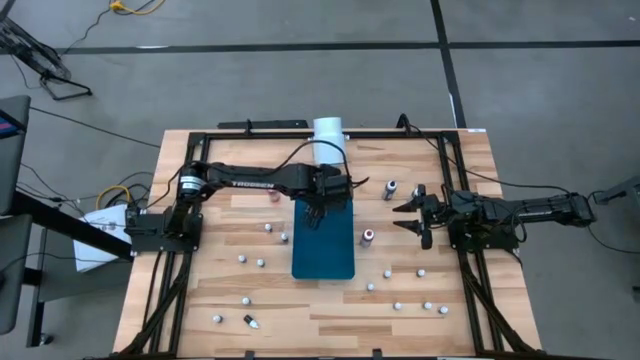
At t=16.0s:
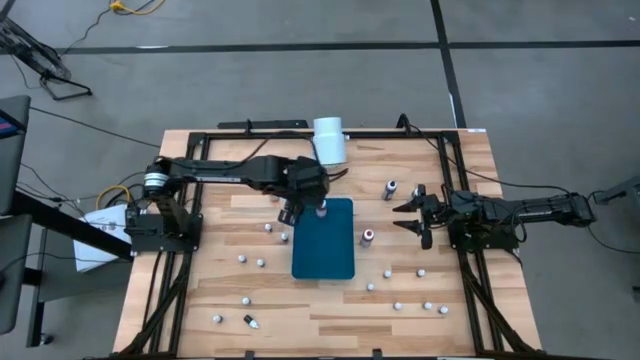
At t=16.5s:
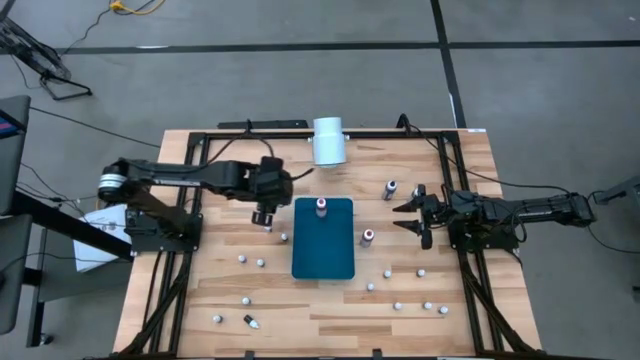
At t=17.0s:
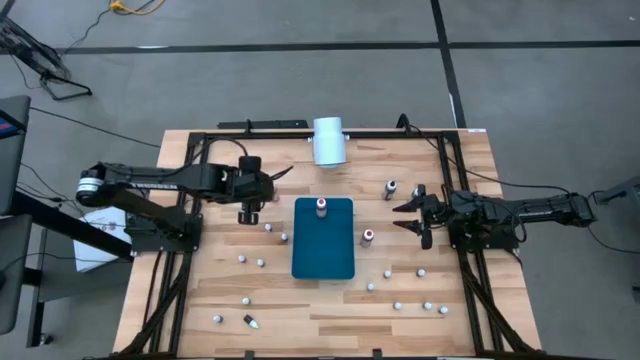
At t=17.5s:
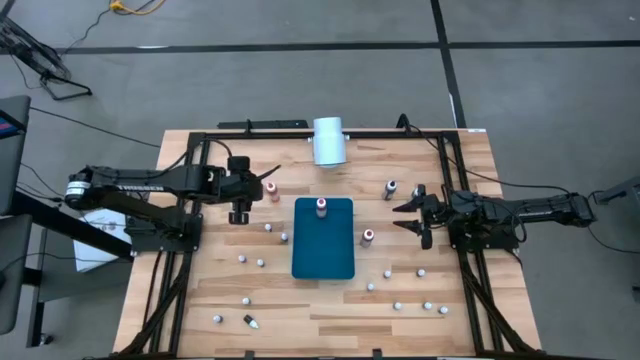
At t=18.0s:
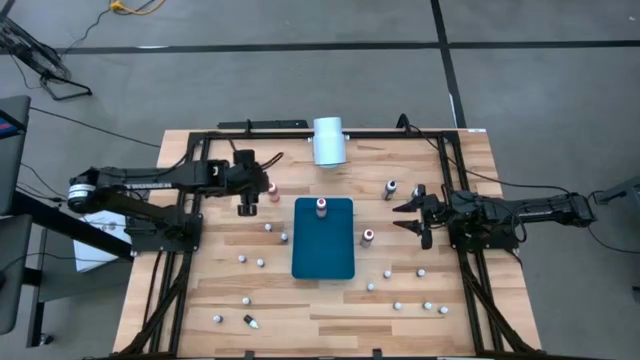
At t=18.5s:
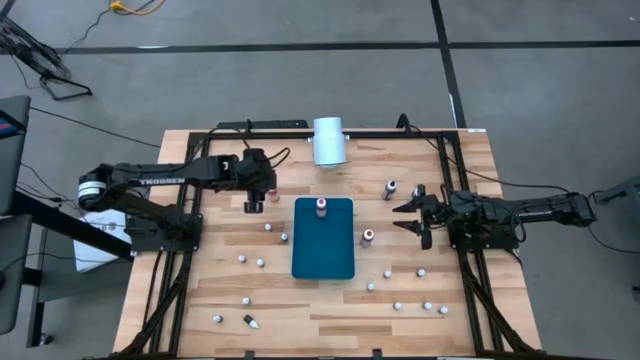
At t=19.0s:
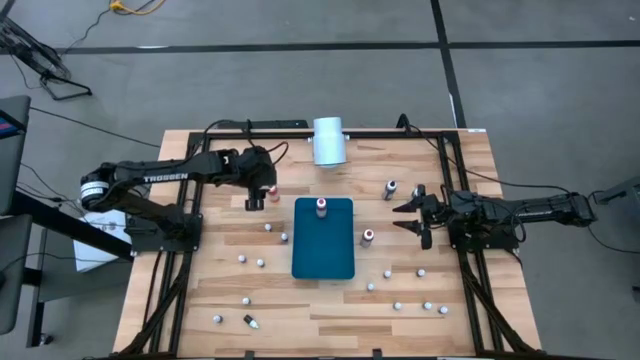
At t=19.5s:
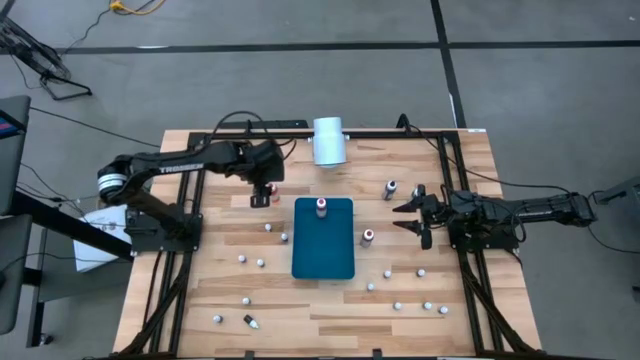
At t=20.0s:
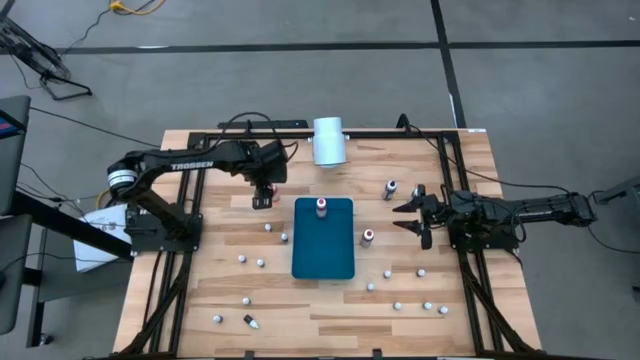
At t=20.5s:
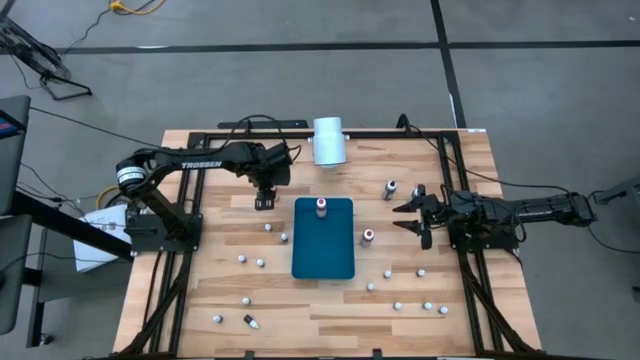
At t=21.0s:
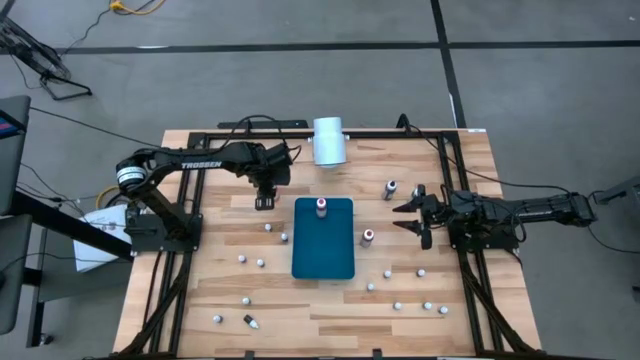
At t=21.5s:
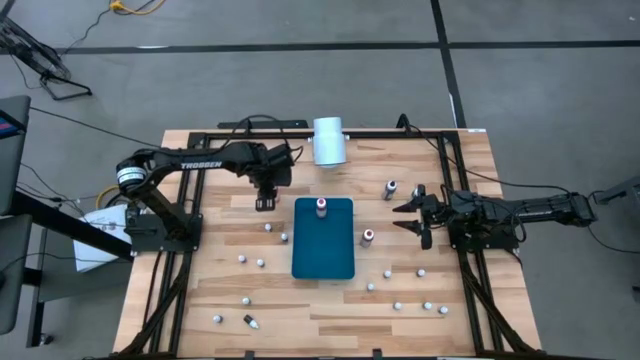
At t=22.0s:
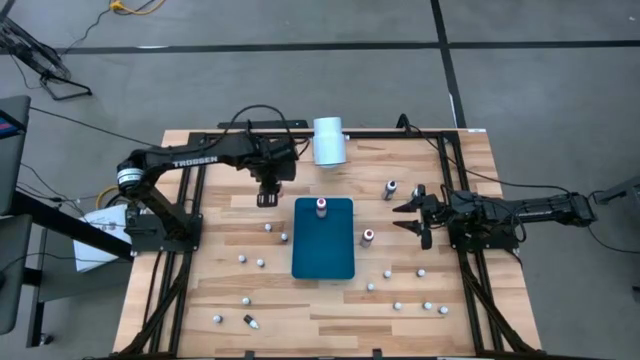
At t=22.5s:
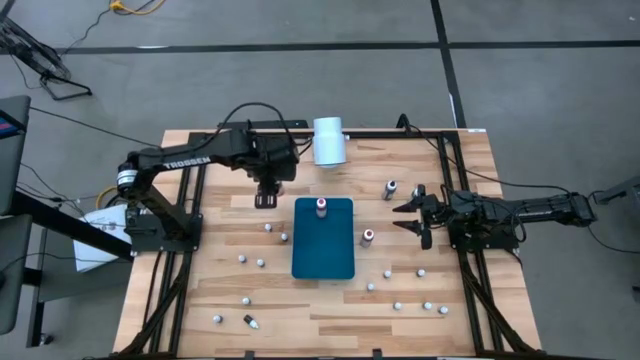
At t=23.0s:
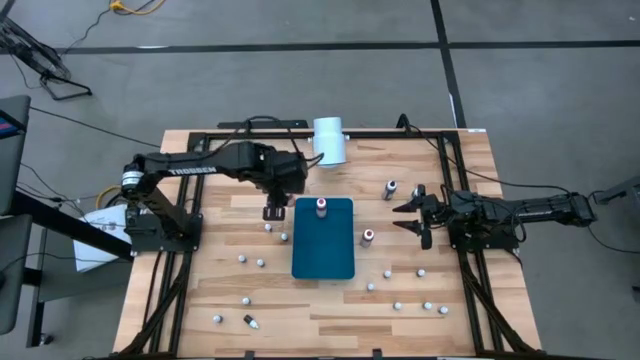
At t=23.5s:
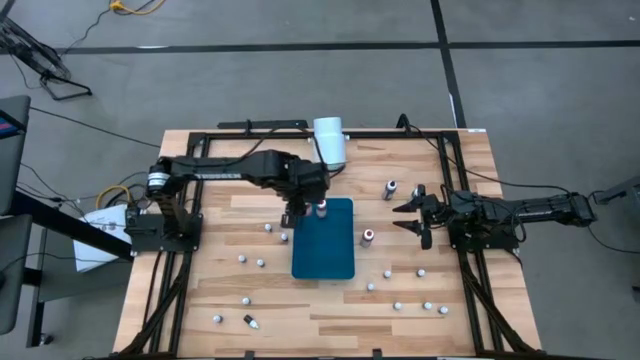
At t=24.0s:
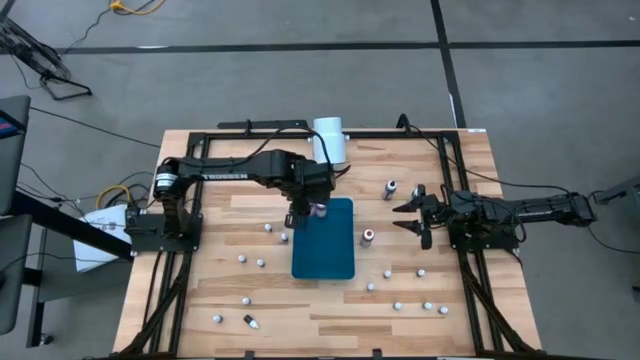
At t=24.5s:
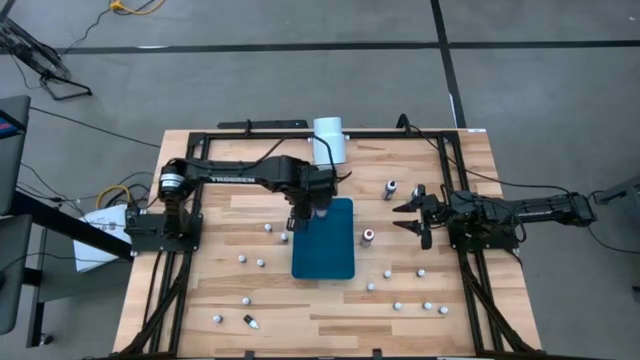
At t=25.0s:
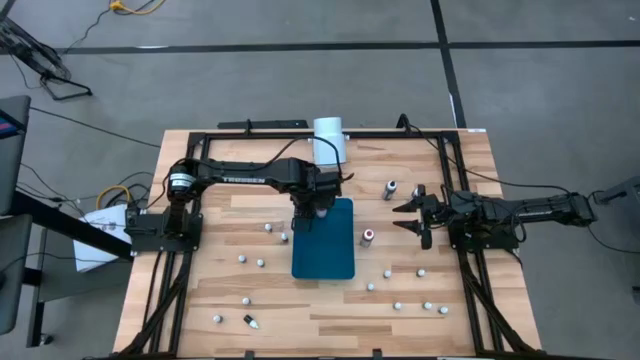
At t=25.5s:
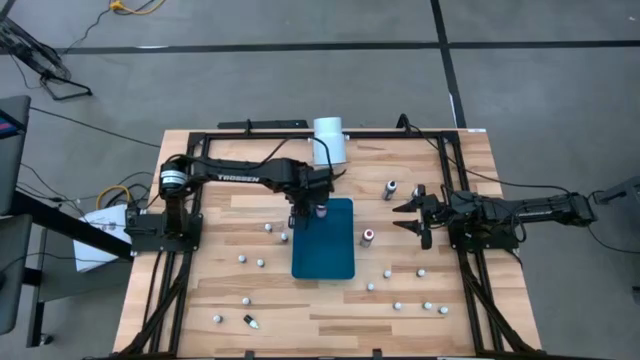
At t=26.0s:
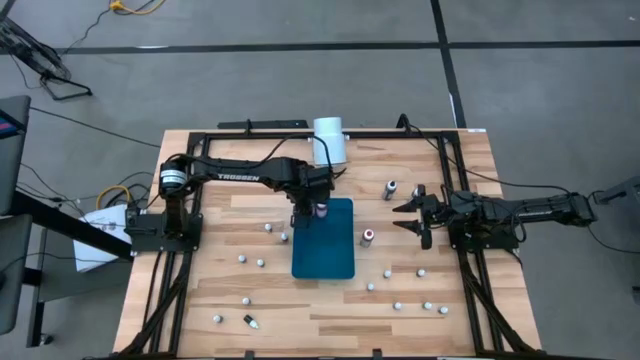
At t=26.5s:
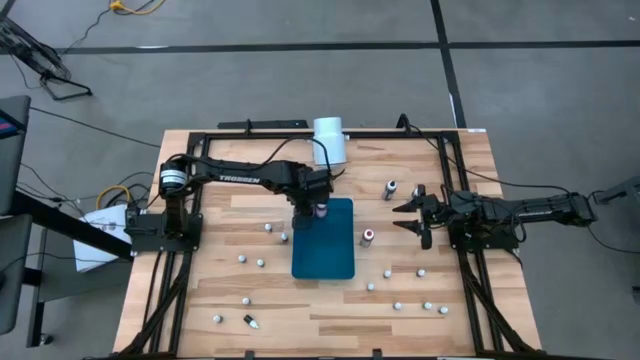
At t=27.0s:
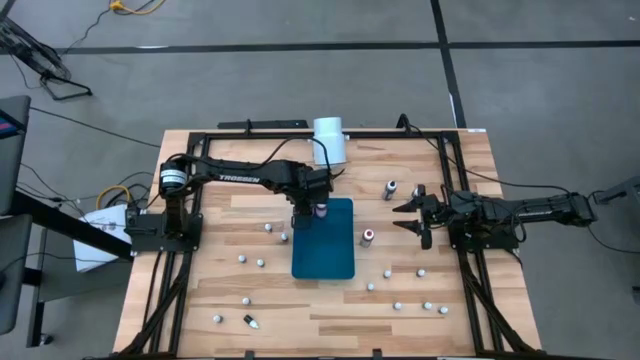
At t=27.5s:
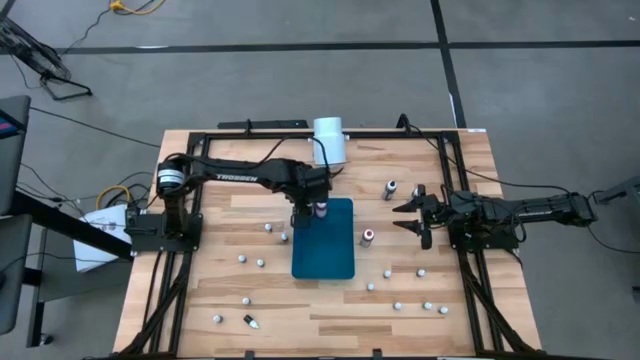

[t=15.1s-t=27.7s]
Task: Pick & Place food coloring
Put the large orange food coloring bottle into the blue bin

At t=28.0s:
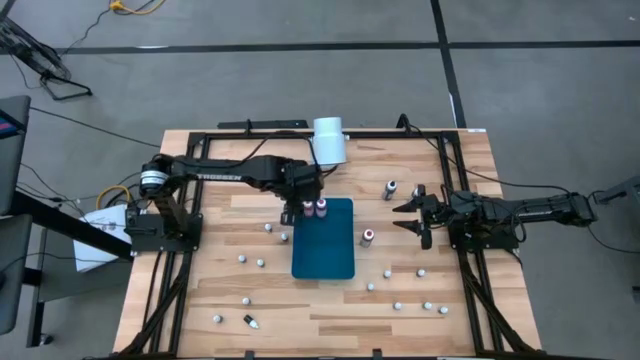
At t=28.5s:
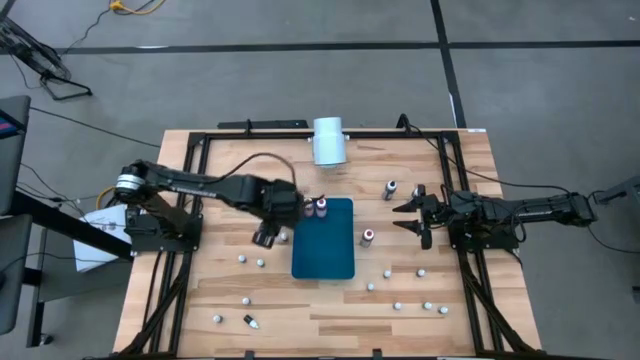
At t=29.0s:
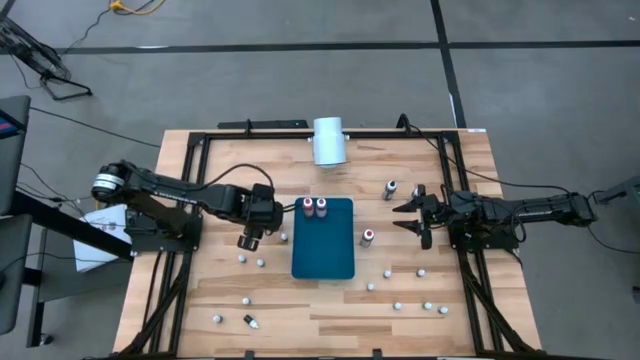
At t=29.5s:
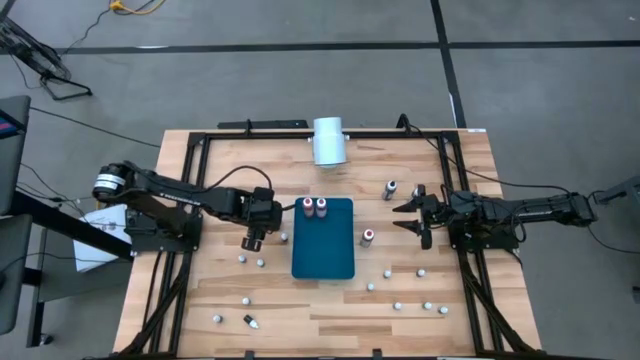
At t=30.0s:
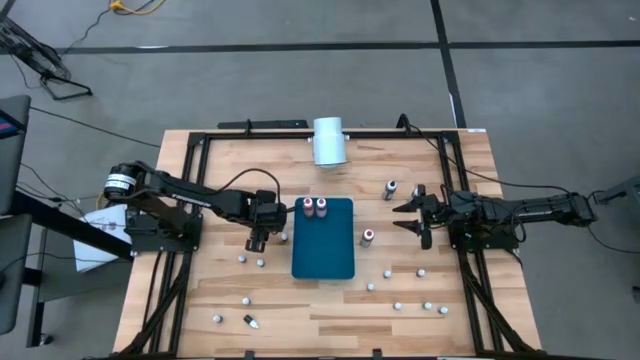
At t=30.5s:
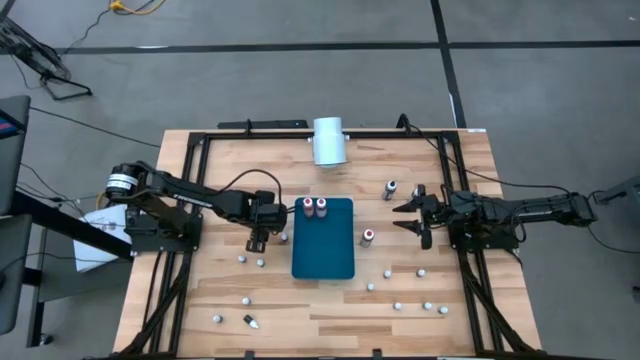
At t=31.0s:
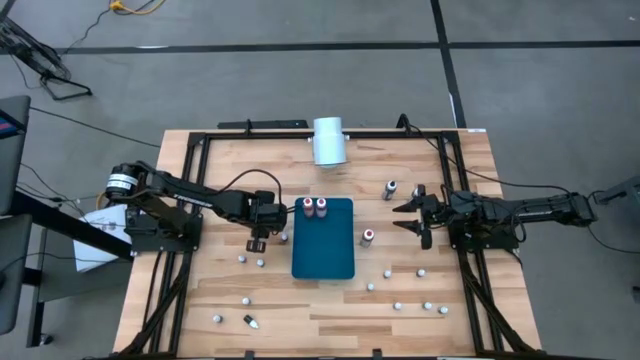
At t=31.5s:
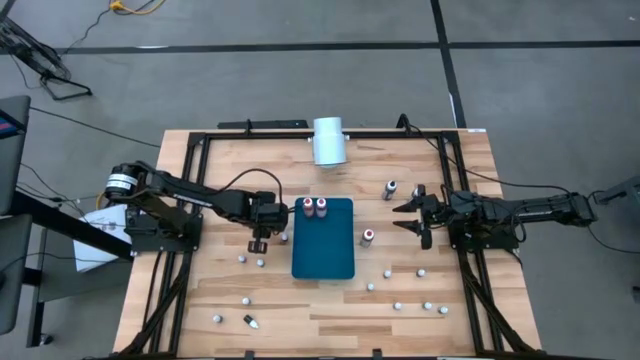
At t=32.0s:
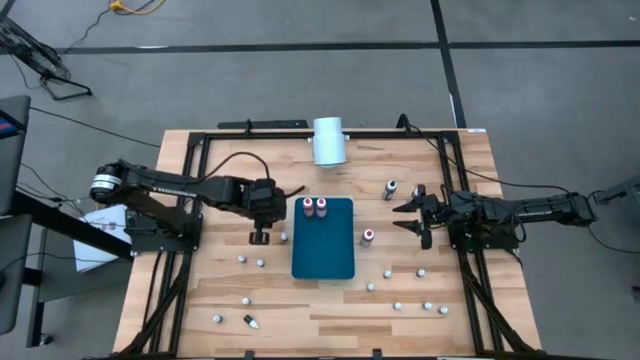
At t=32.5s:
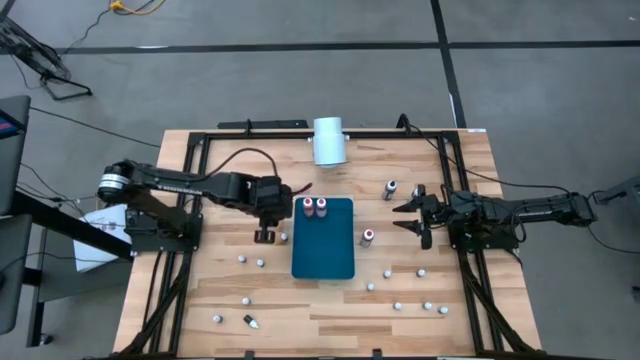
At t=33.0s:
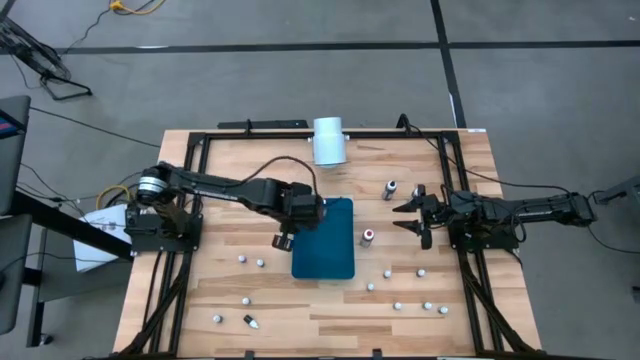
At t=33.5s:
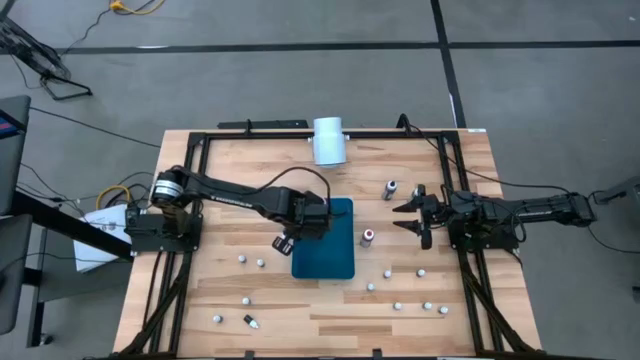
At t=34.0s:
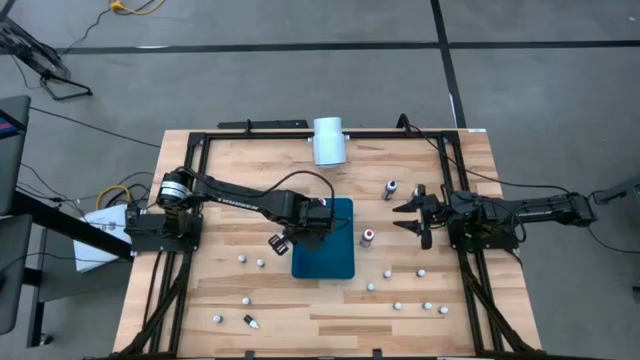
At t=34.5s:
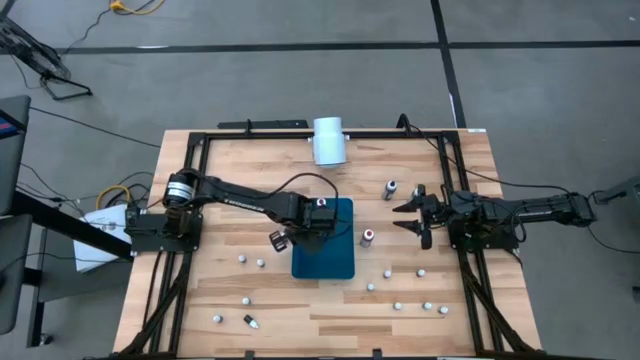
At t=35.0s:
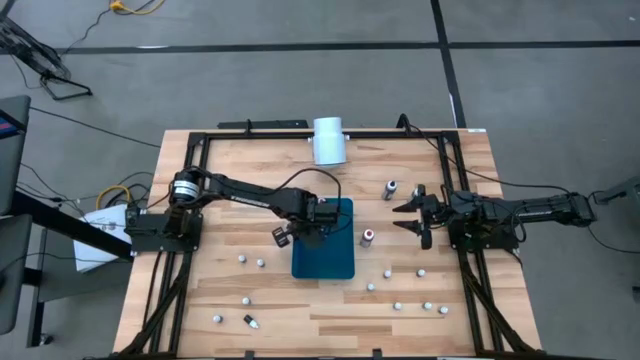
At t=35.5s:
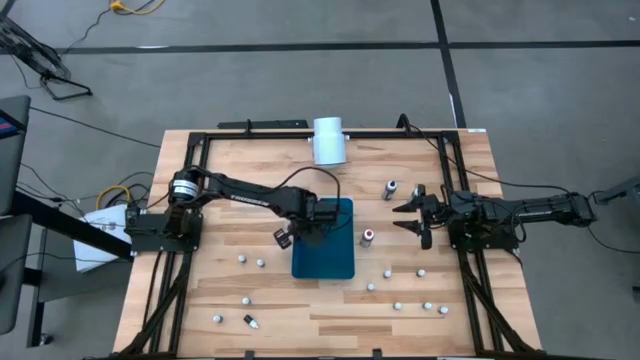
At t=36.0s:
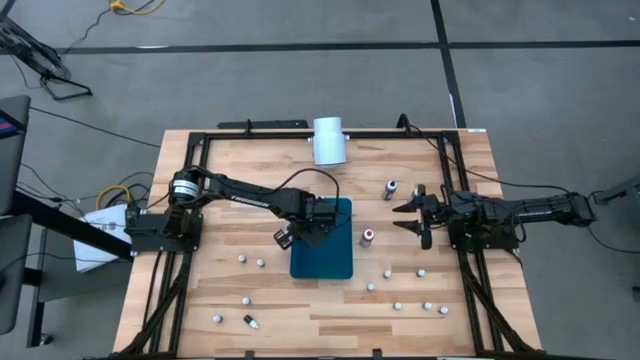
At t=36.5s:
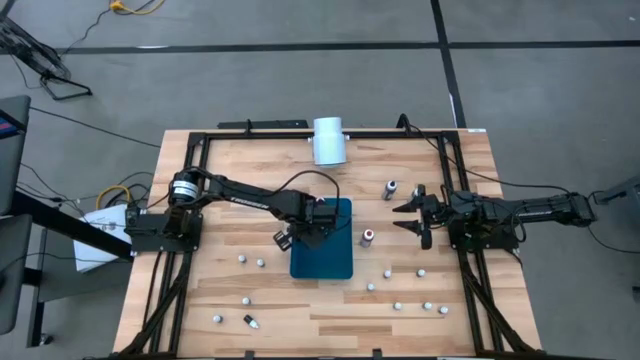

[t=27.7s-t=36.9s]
Put the small yellow food coloring bottle into the blue bin
